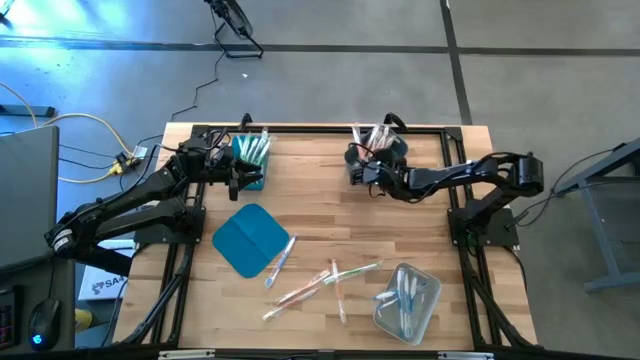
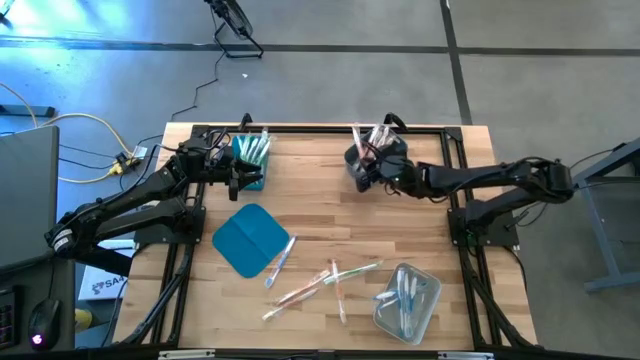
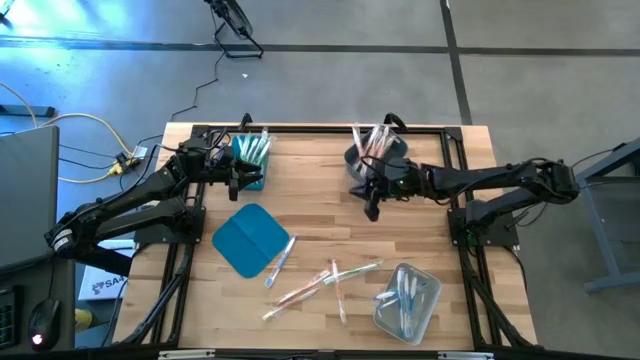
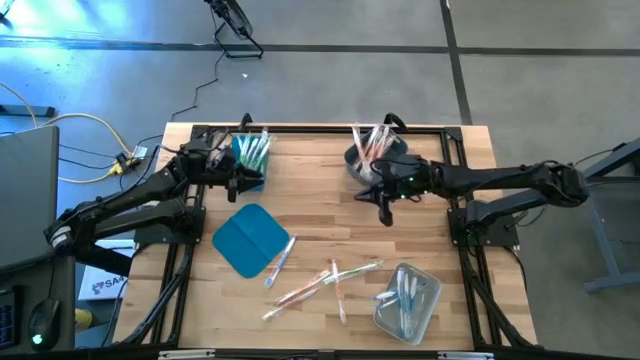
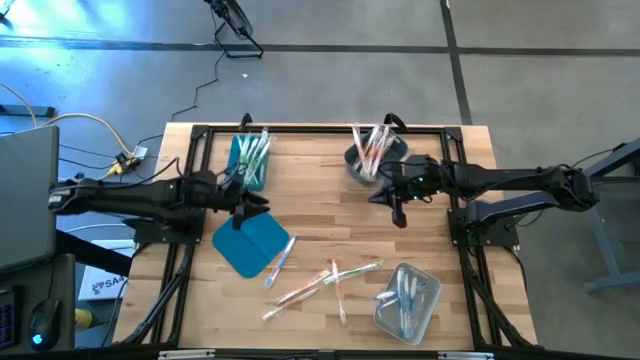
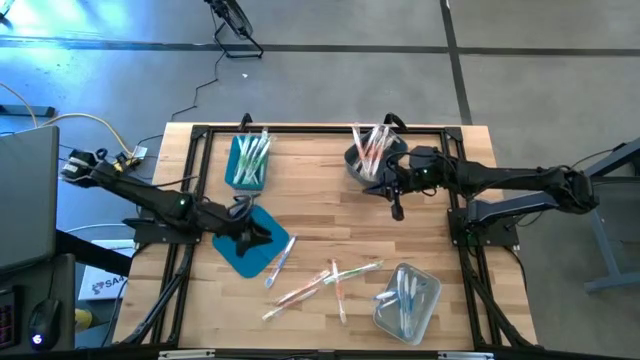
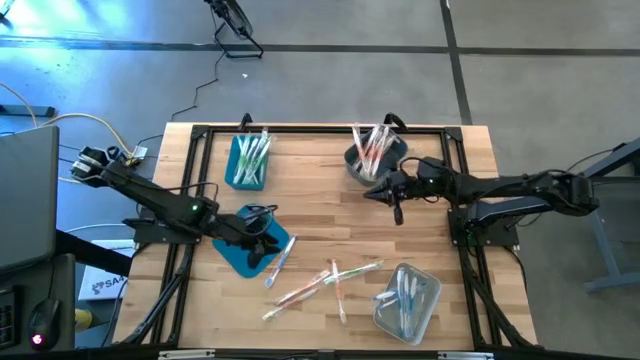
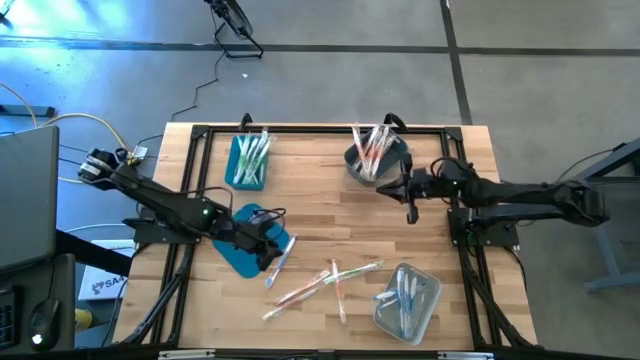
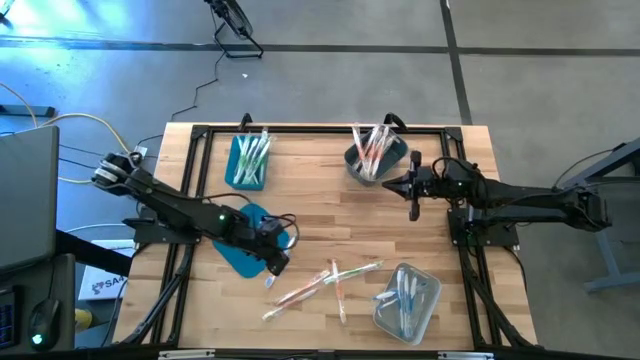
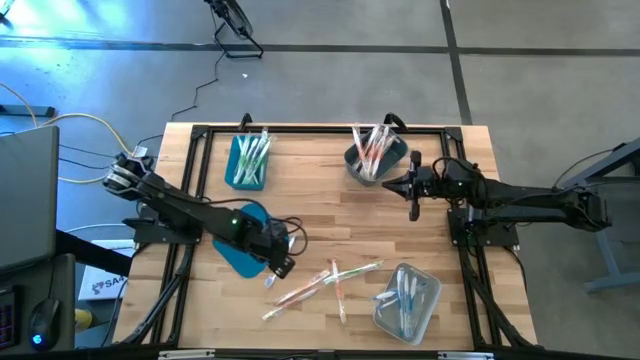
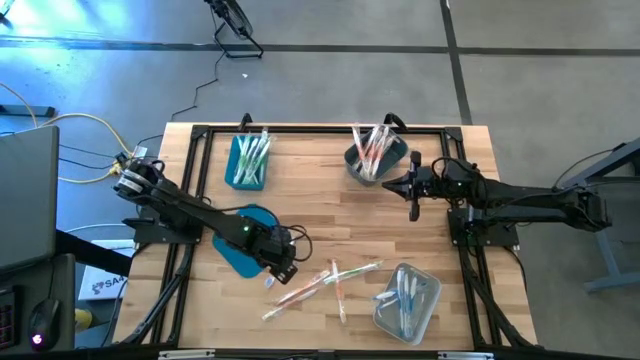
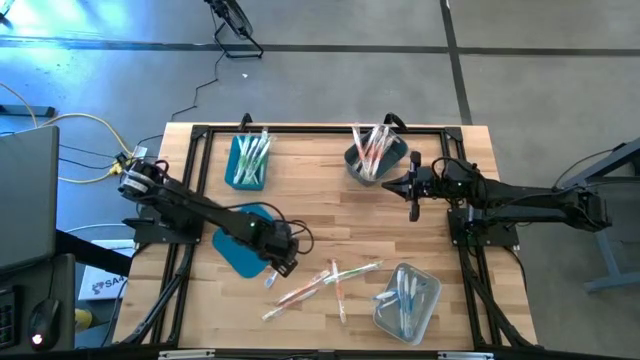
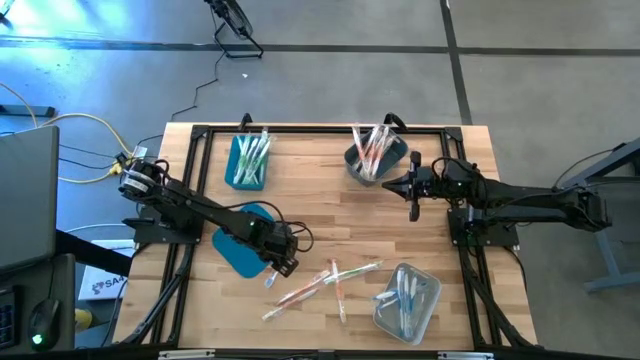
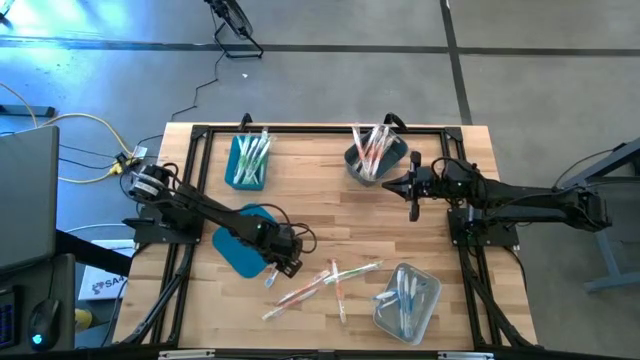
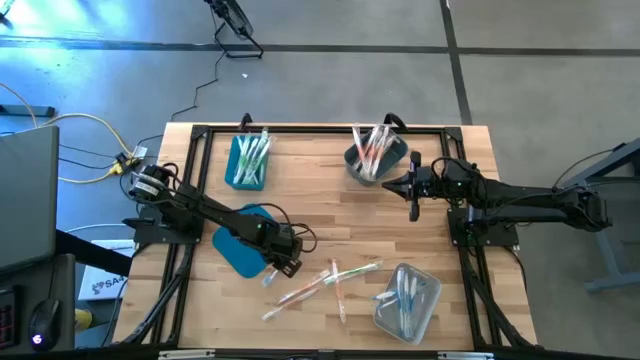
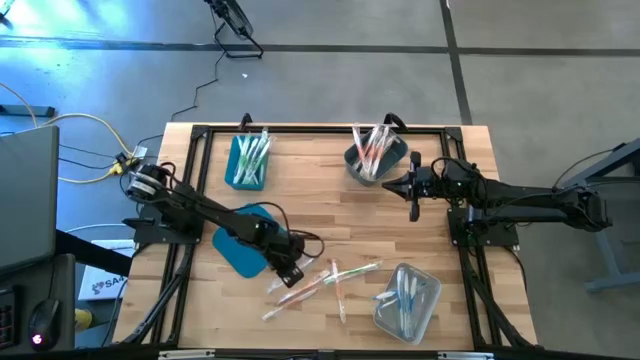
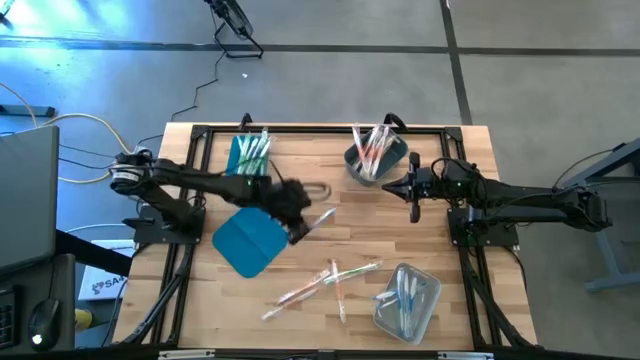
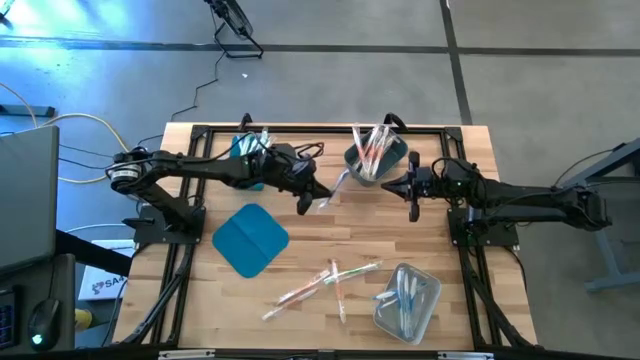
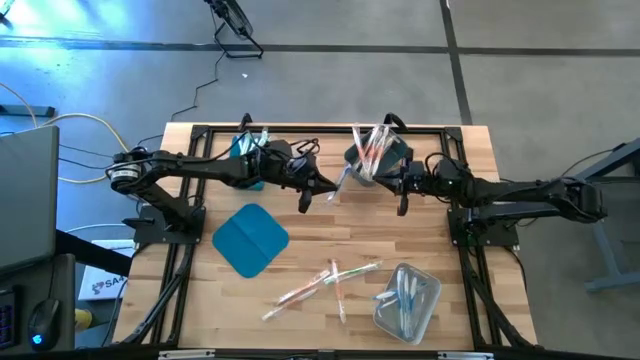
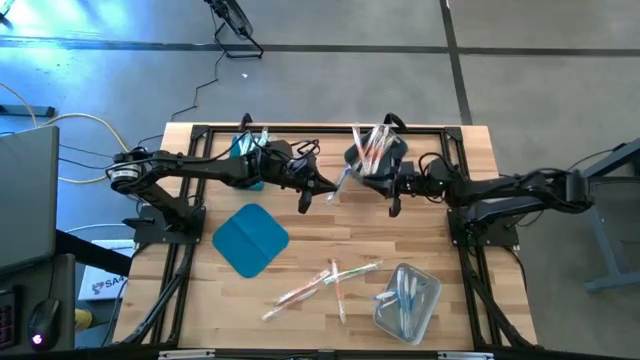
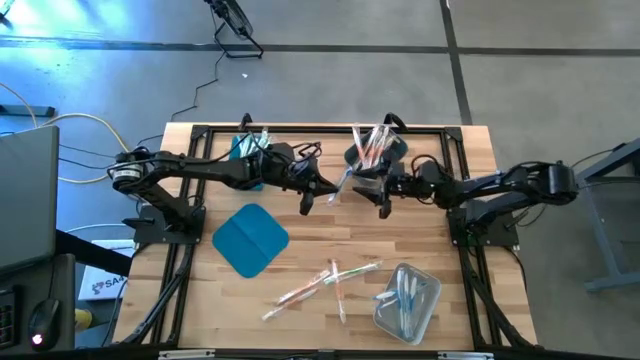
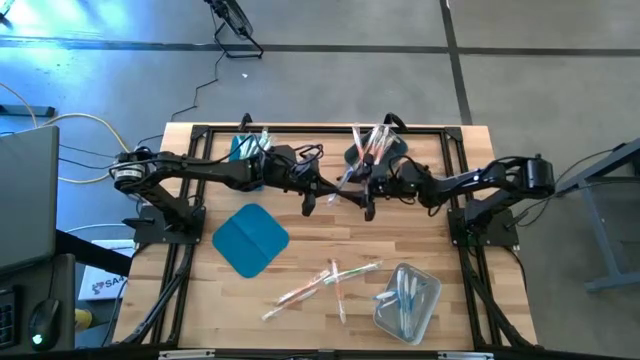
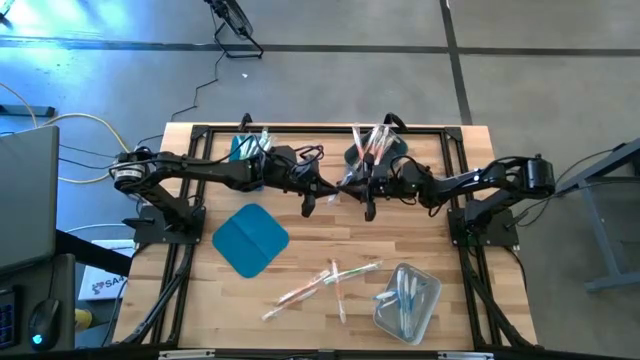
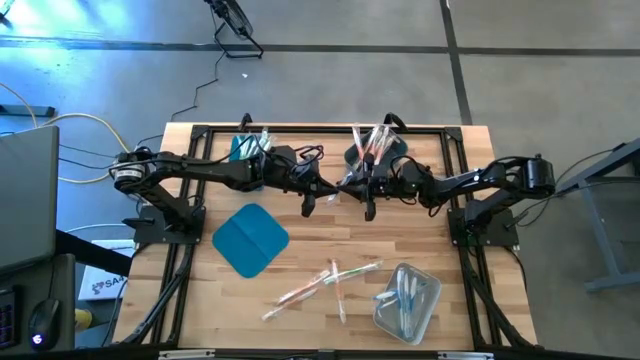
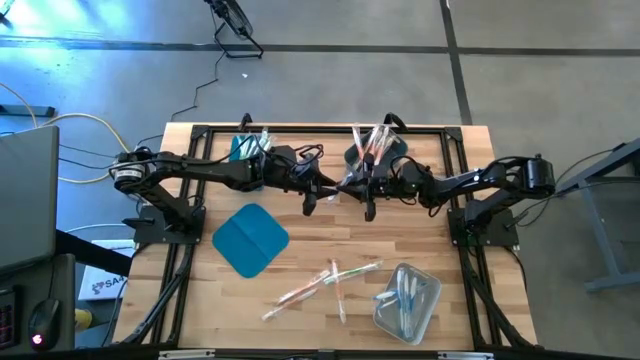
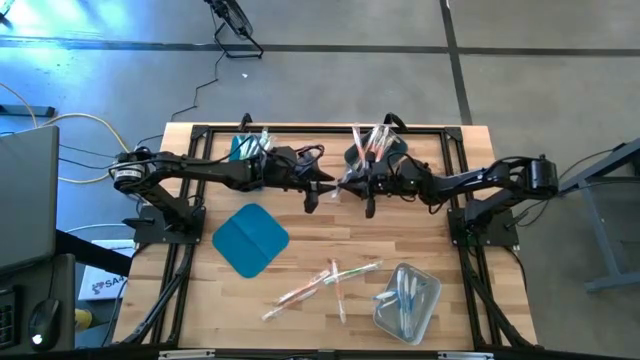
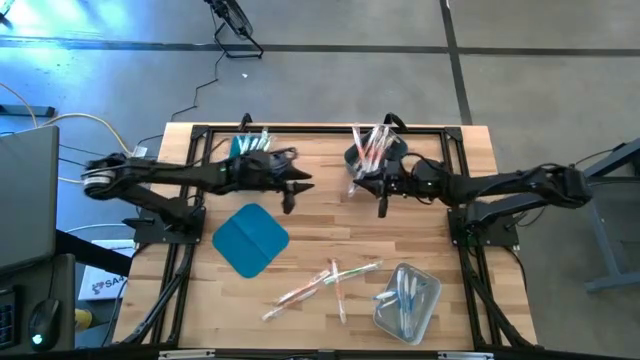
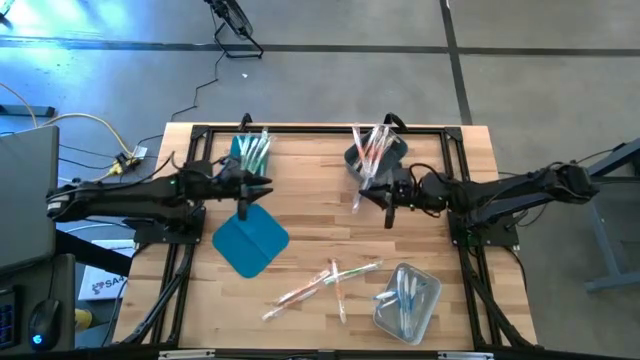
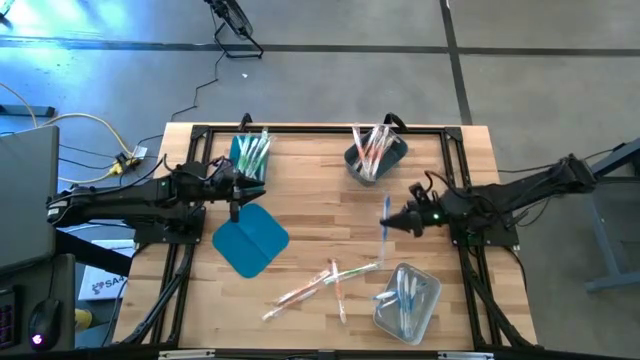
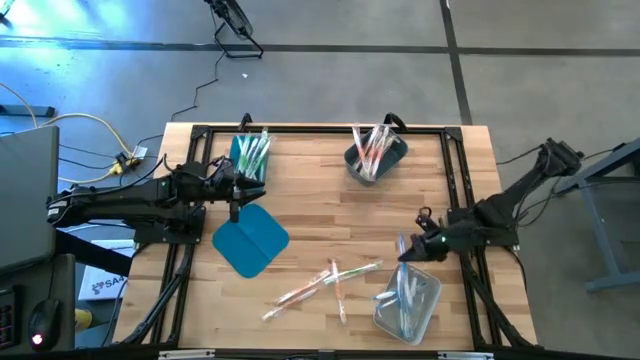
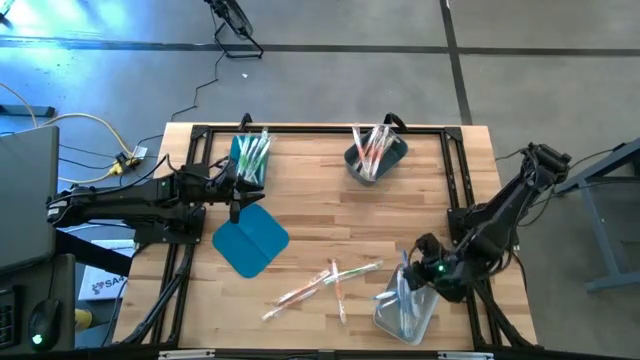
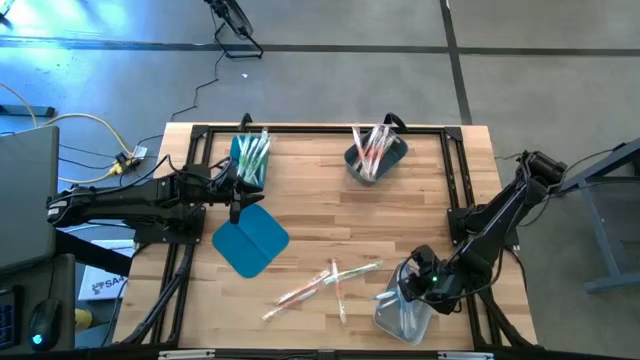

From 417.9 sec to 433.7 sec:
Task: Pick & Place Toothbrushes
Put the blue toothbrush into the light gray bin

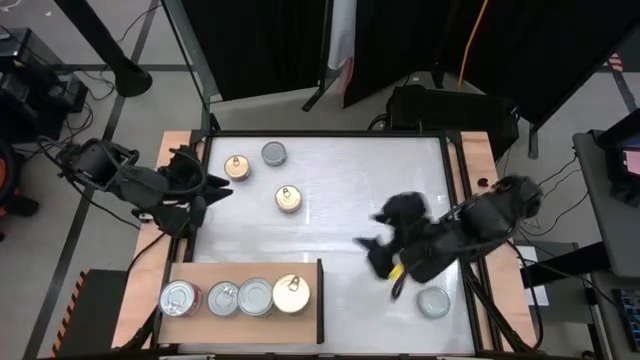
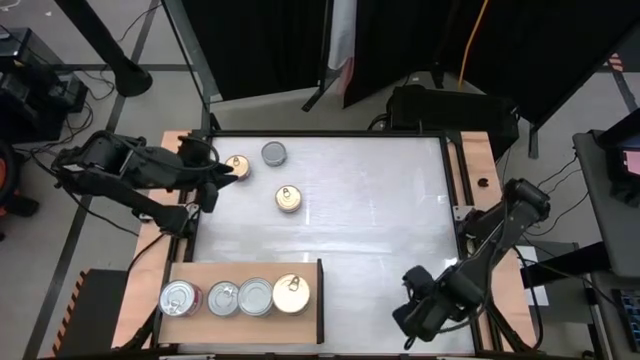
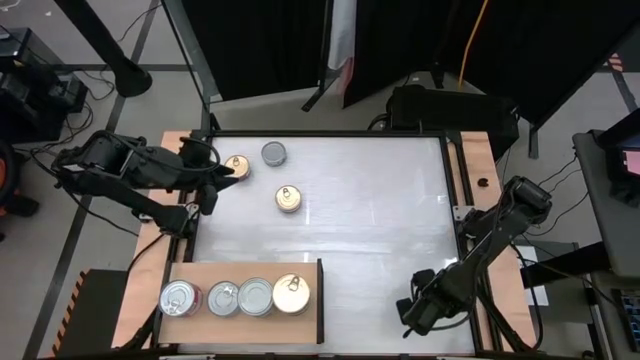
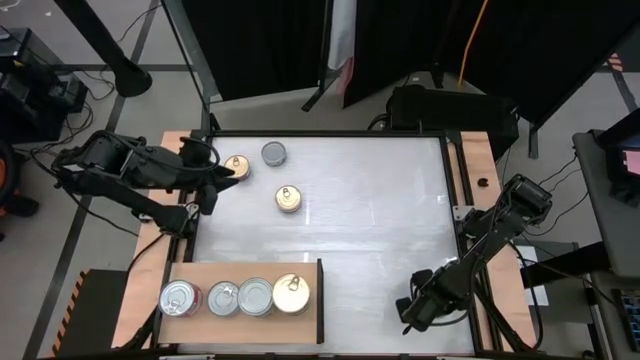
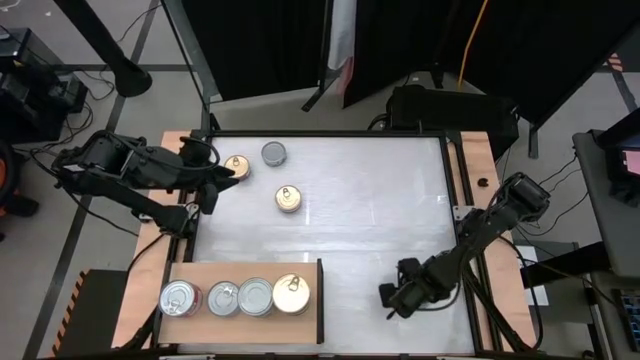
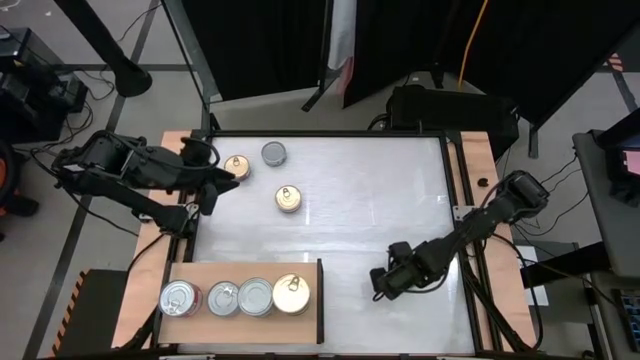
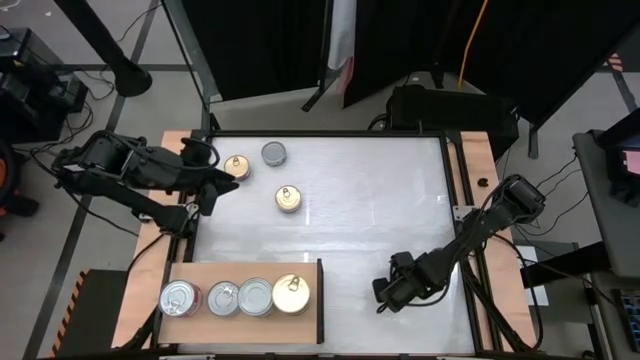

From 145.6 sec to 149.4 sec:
Task: Stack canned seafood by type on shelf
Stack the green white tuna can on top of the other green white tuna cans on the shelf
